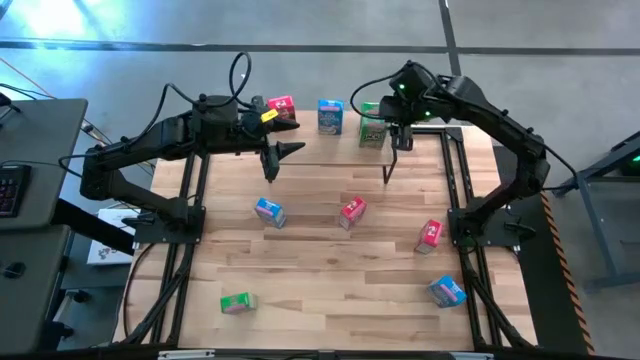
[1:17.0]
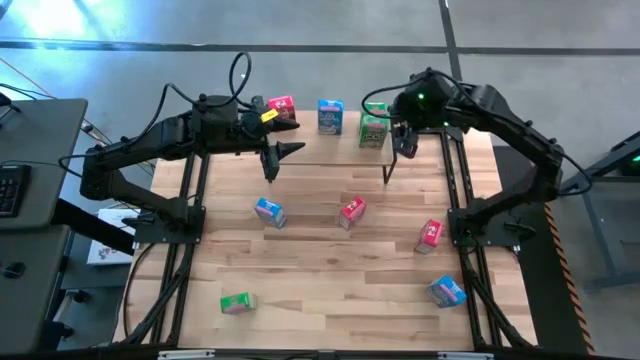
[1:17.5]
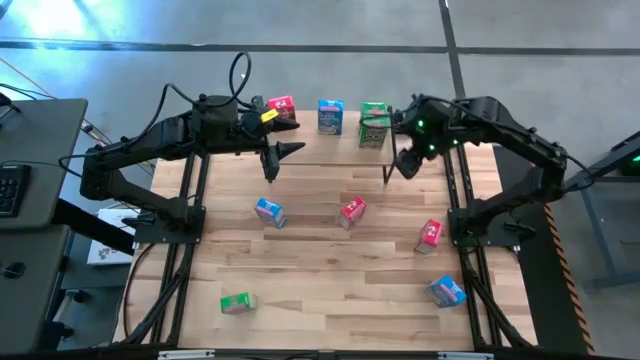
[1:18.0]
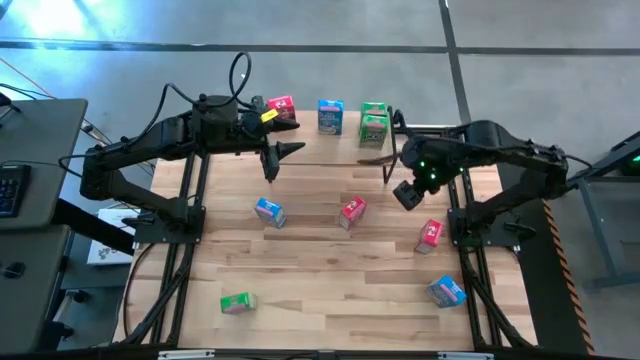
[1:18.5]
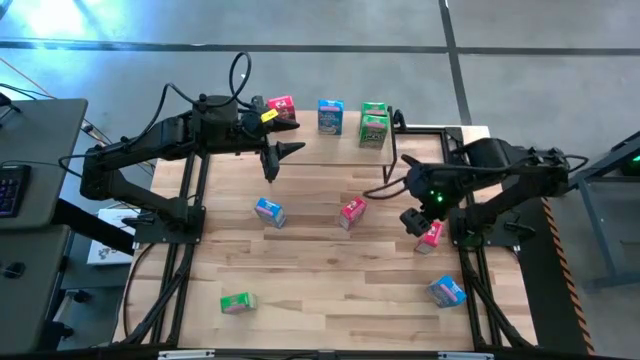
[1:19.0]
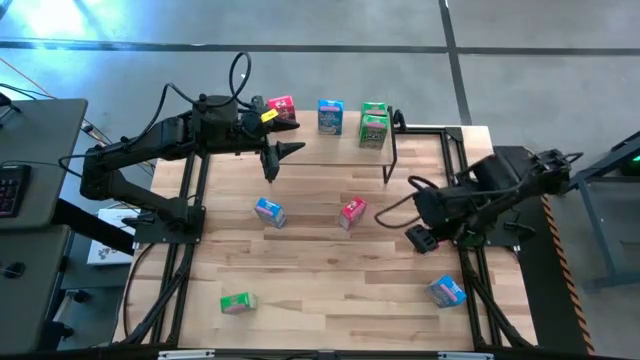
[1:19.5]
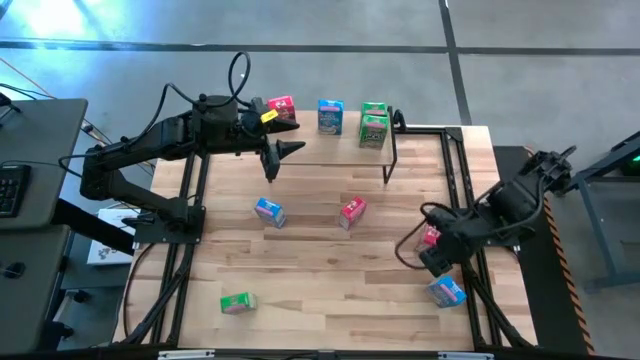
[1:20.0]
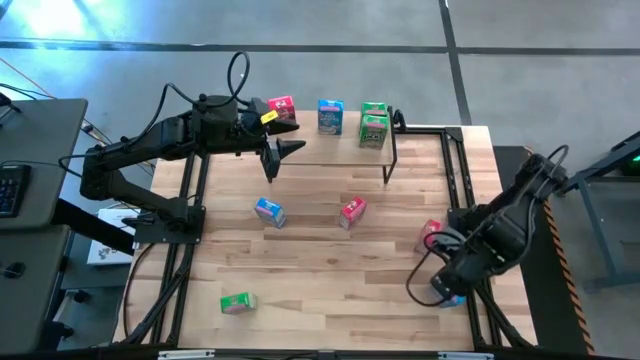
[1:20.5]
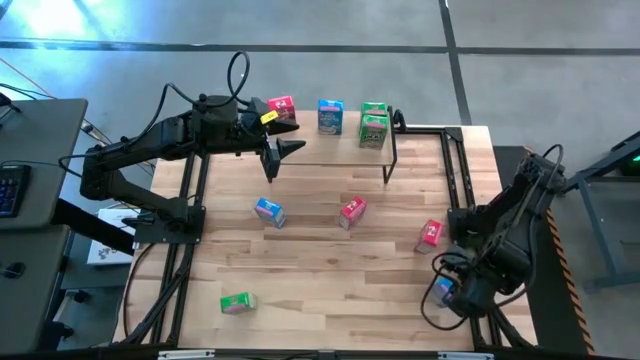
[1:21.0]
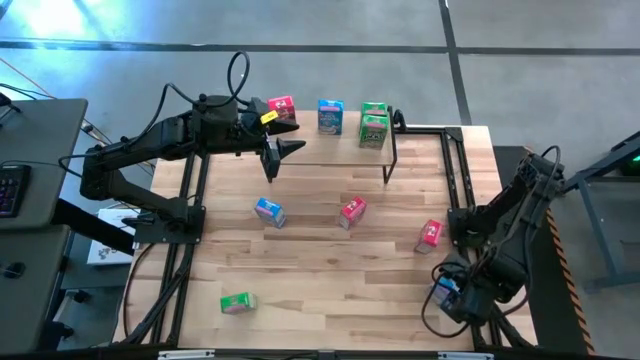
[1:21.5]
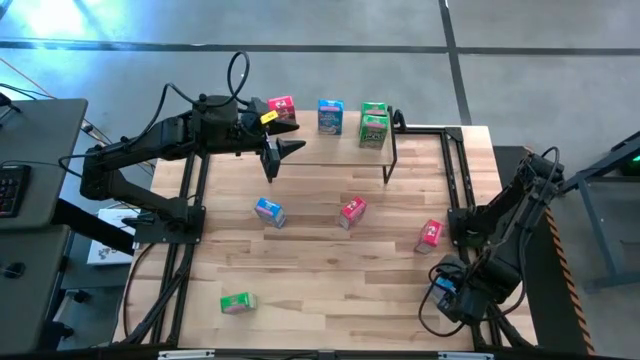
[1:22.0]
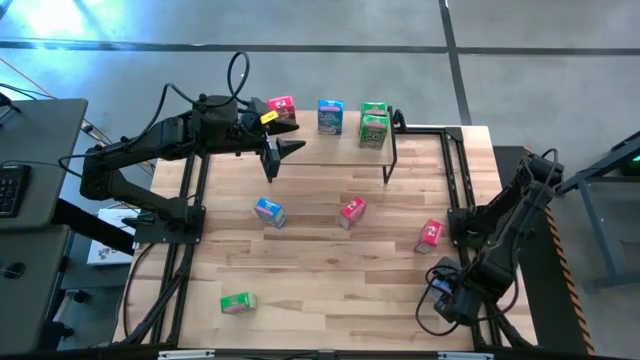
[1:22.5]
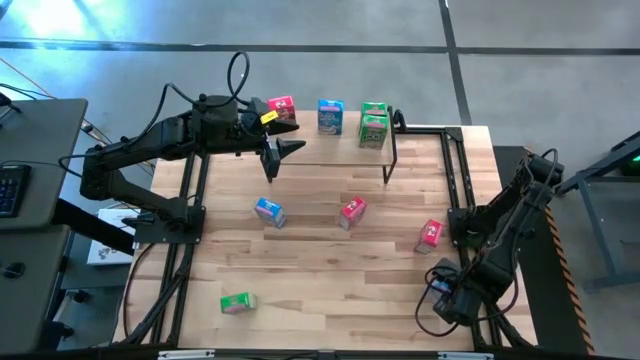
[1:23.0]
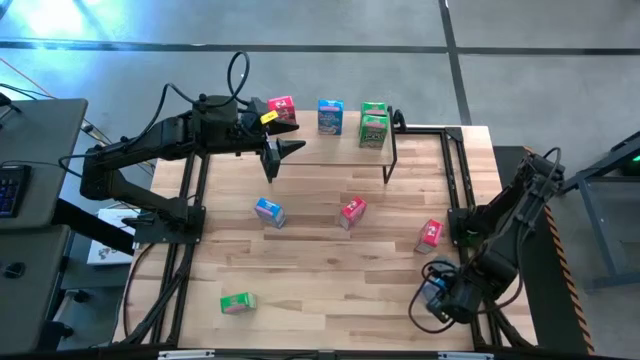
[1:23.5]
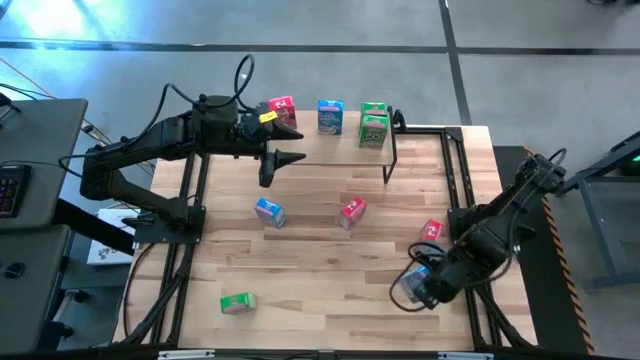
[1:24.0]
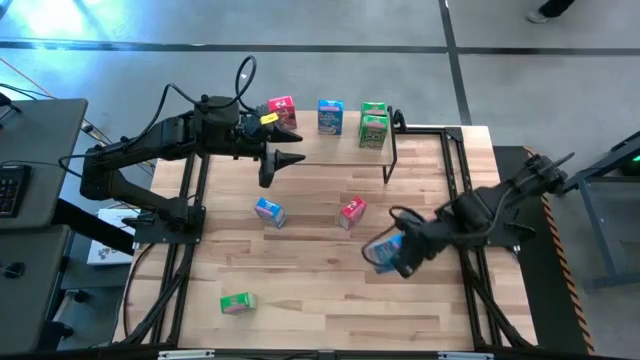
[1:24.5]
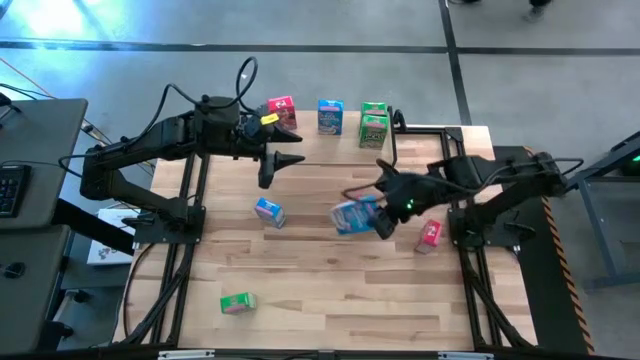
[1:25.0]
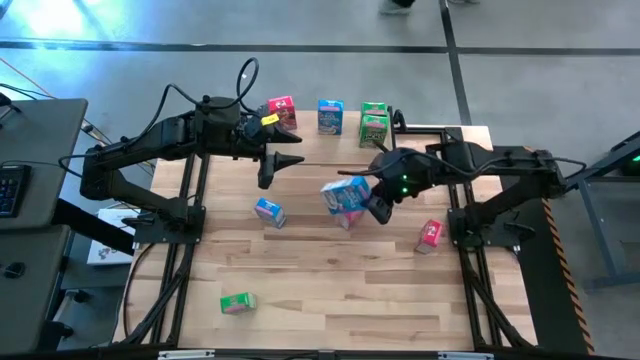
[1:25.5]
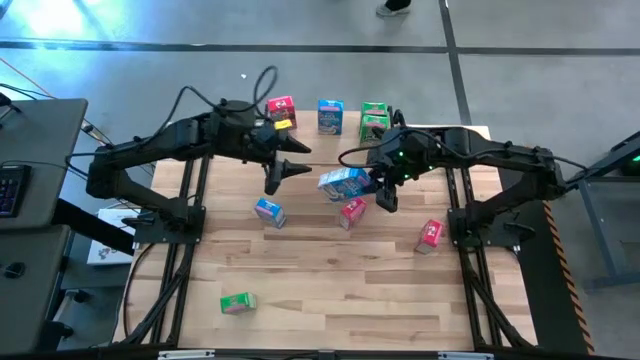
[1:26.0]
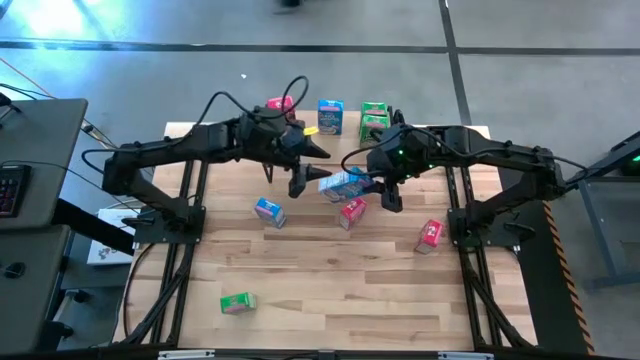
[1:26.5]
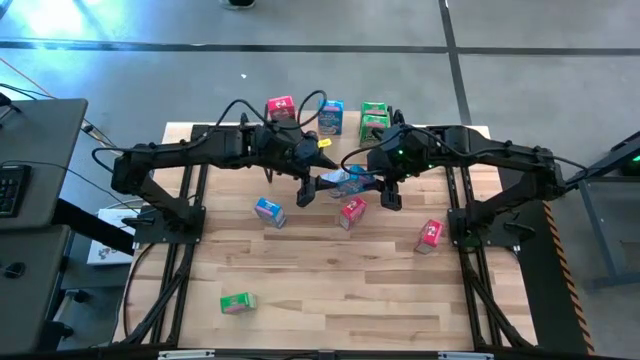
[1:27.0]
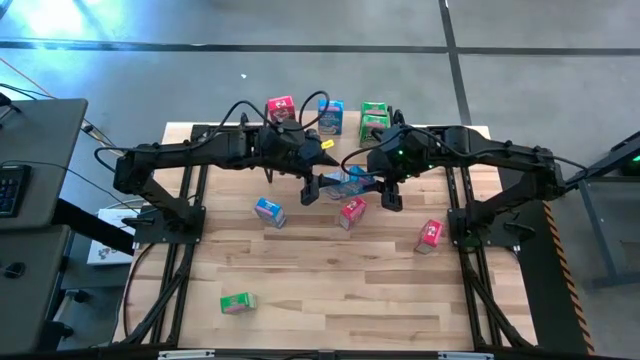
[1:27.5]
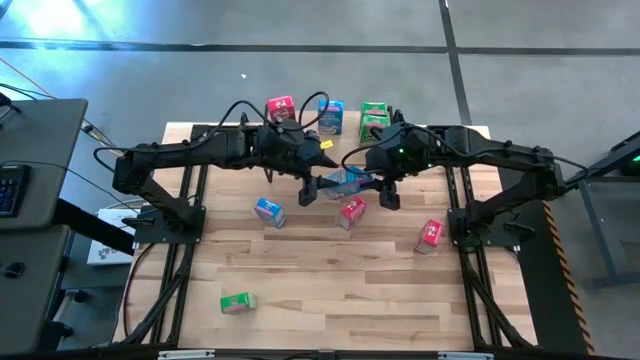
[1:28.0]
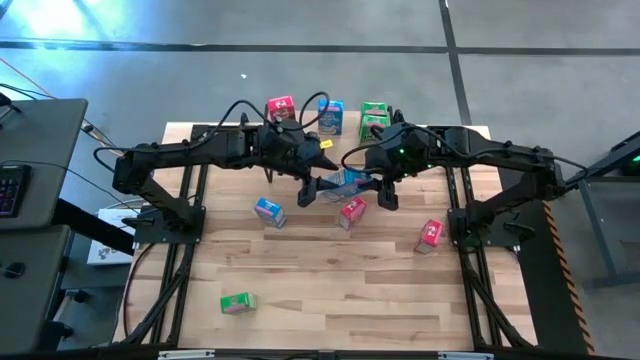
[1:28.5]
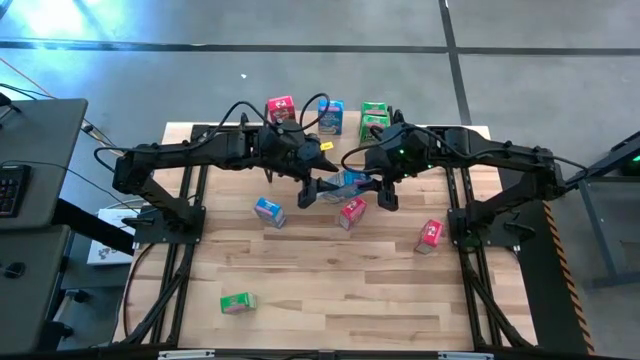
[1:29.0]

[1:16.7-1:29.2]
Task: Stack cereal on shelf
Put the right blue cereal box on the shelf aligned with the other blue cereal box

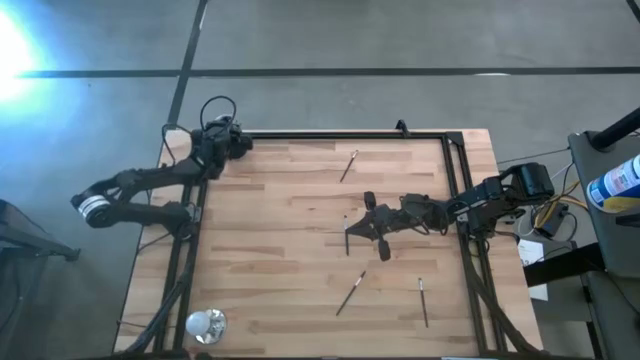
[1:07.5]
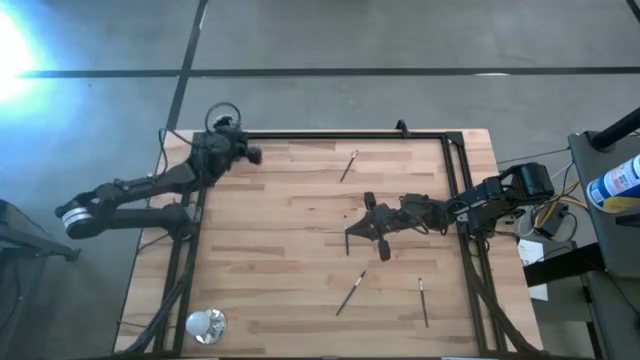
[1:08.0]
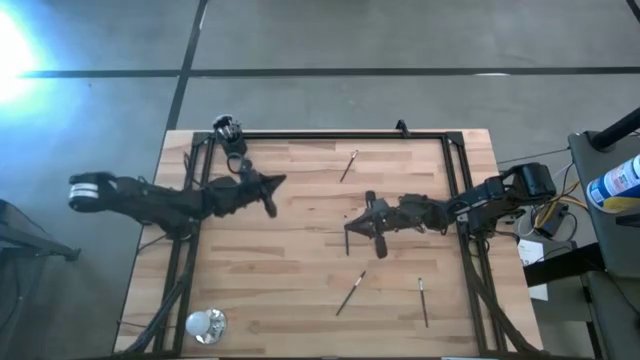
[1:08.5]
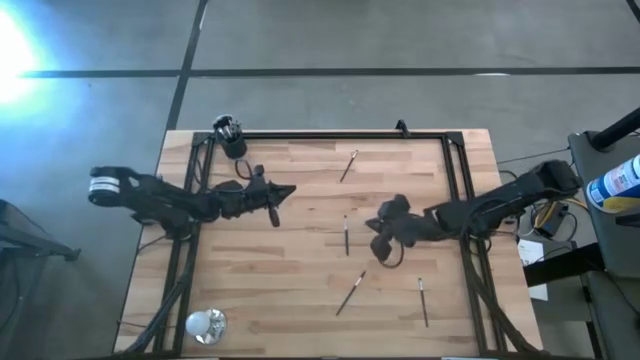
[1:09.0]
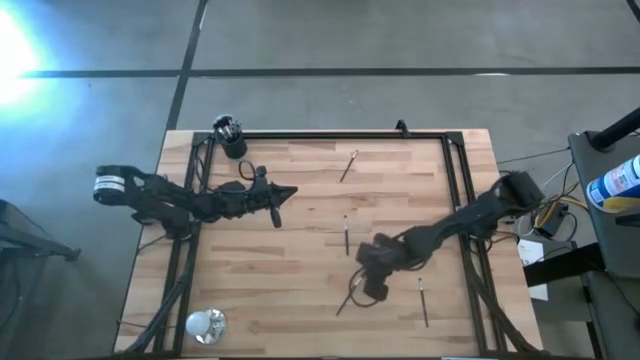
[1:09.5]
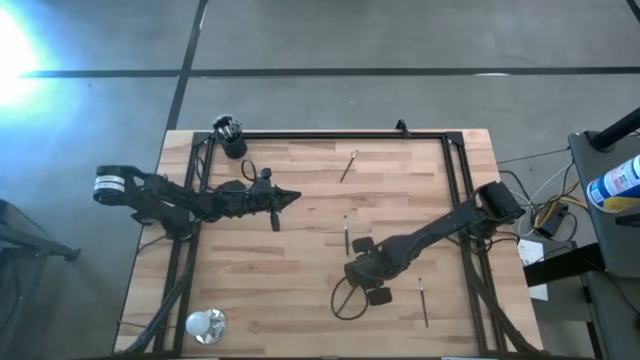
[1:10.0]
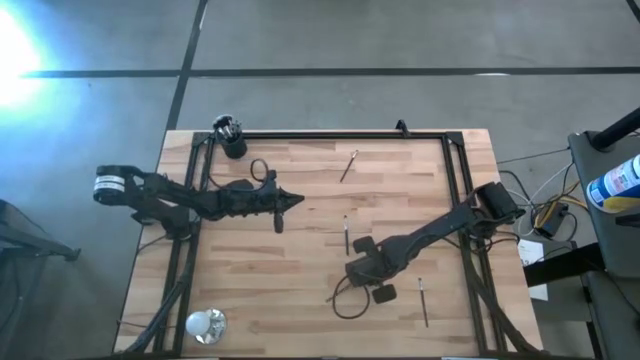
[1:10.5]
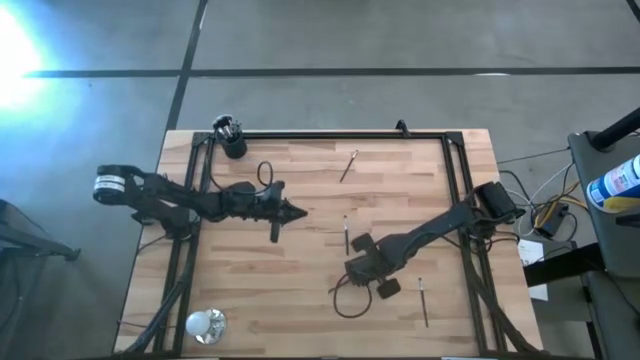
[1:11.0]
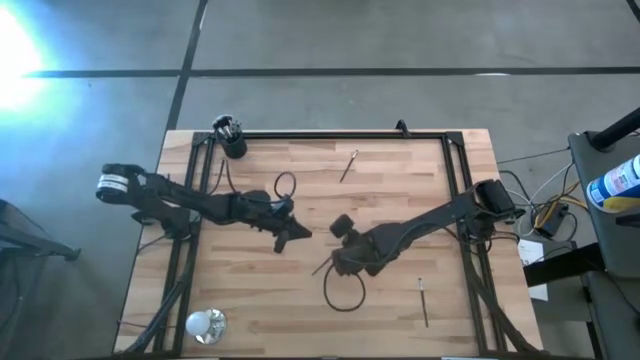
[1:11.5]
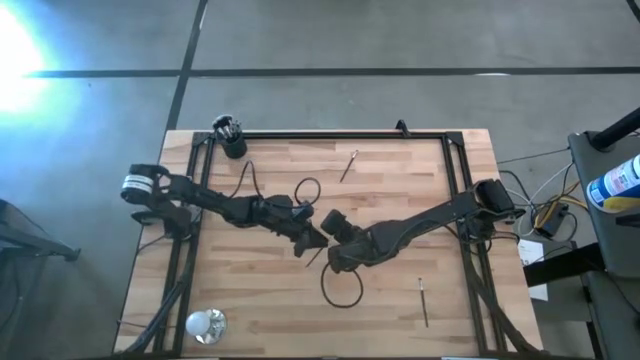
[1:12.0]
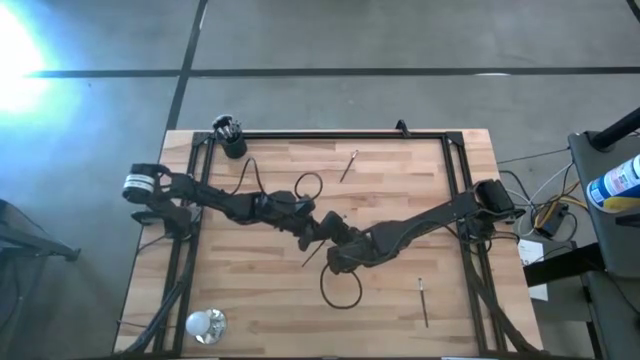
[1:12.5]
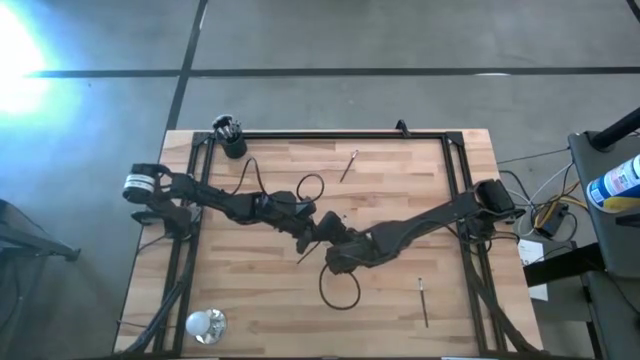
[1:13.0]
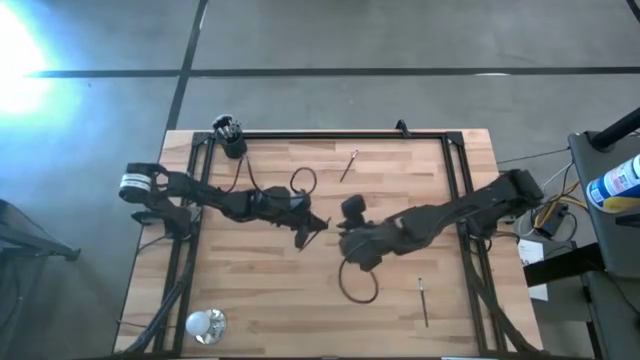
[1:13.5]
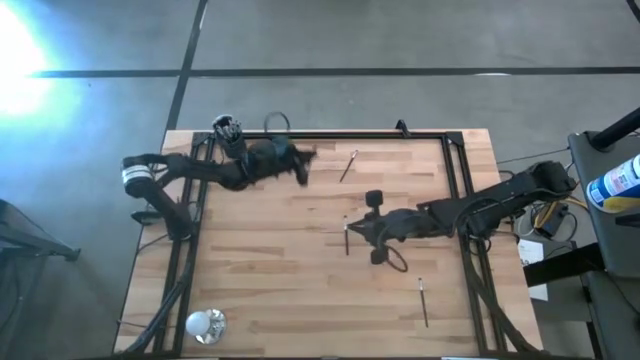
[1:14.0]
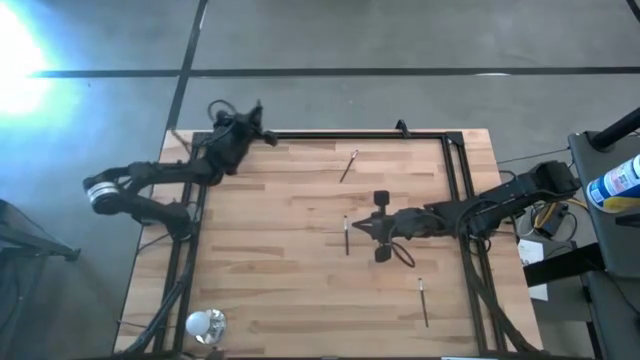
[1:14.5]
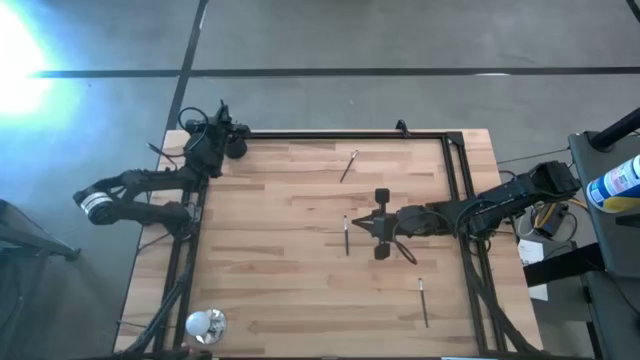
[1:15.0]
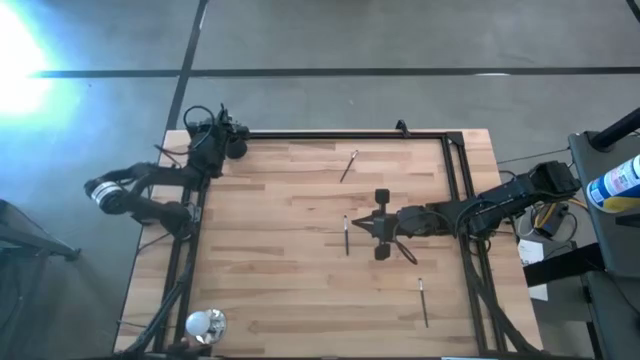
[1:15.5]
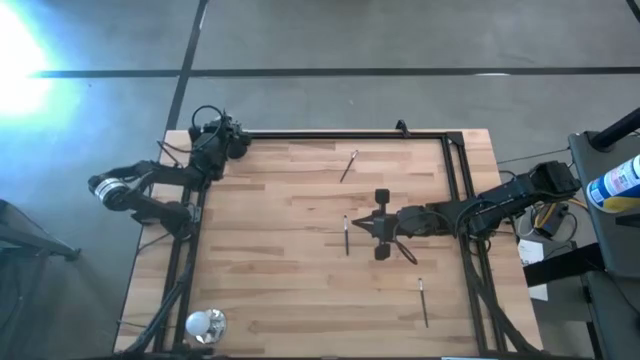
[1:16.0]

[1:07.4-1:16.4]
Task: Put items in baskets/containers
Put the black lash brush into the black pen holder
